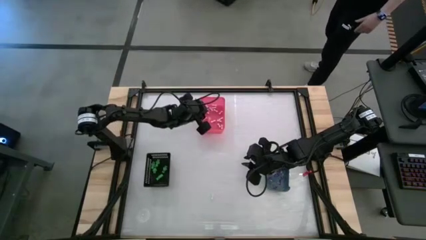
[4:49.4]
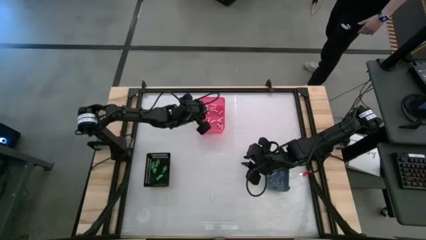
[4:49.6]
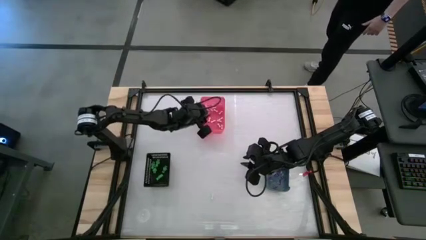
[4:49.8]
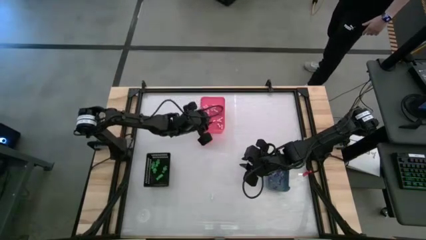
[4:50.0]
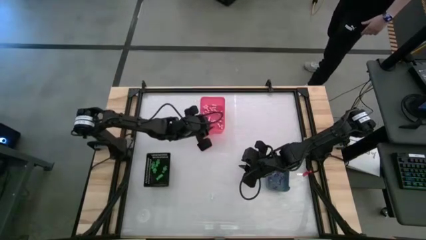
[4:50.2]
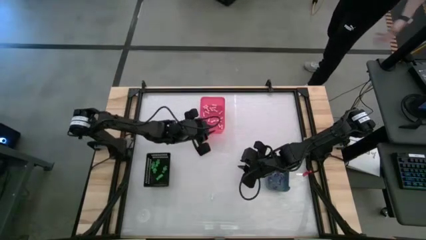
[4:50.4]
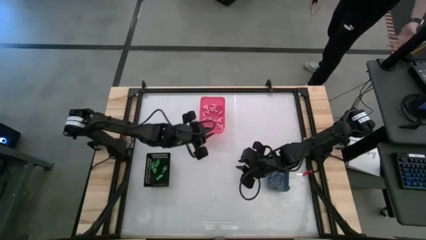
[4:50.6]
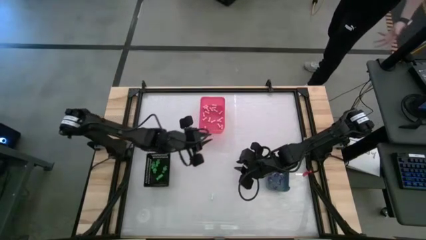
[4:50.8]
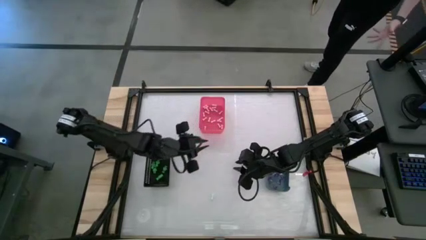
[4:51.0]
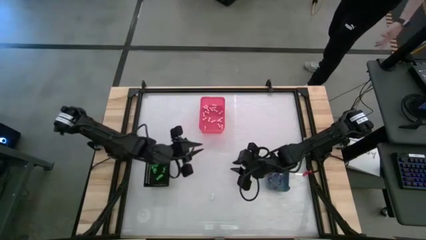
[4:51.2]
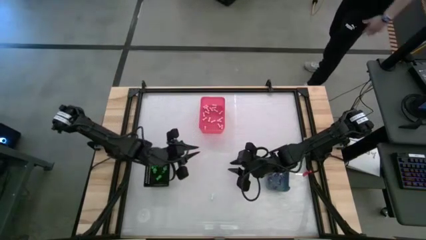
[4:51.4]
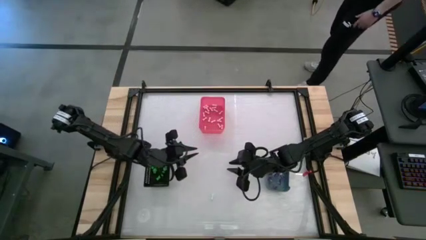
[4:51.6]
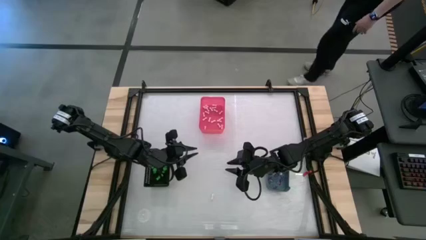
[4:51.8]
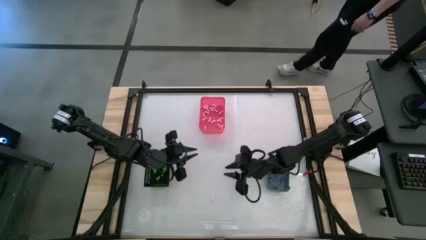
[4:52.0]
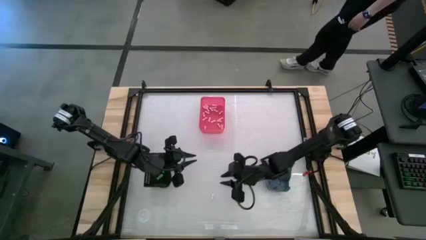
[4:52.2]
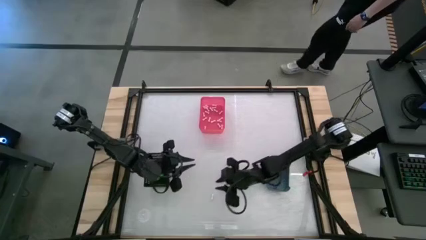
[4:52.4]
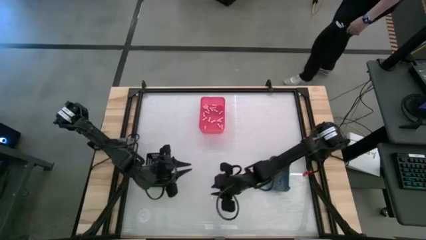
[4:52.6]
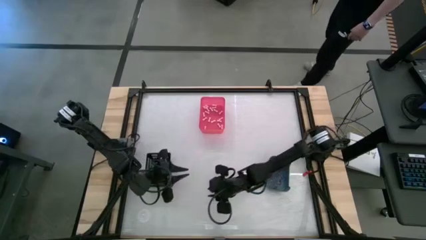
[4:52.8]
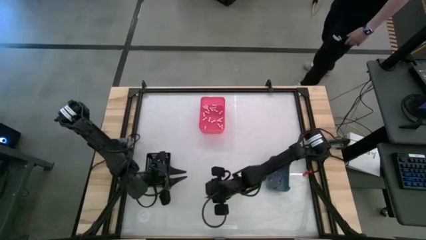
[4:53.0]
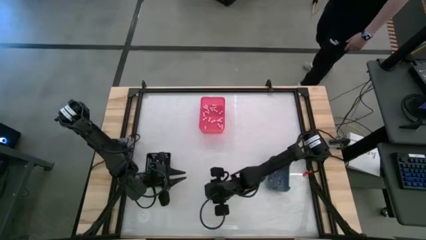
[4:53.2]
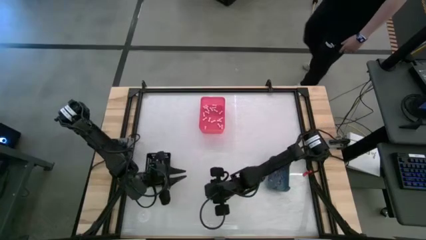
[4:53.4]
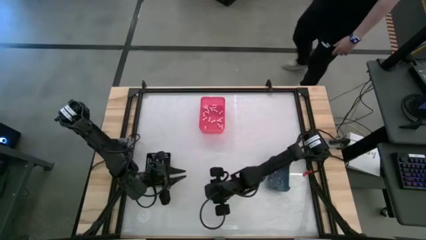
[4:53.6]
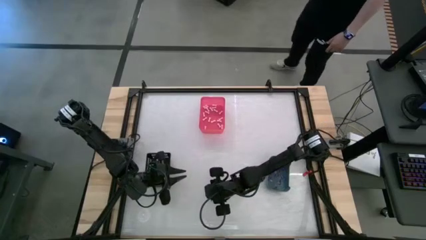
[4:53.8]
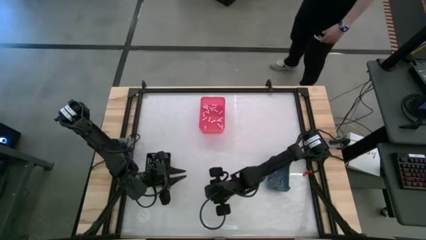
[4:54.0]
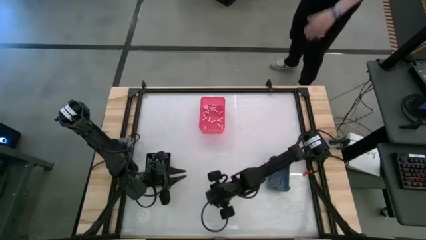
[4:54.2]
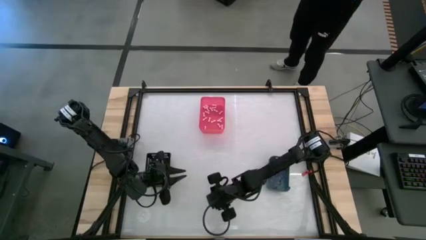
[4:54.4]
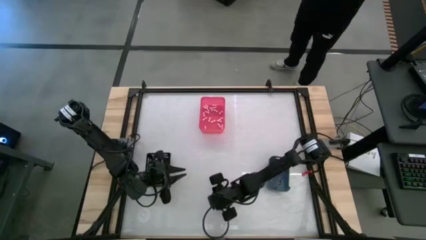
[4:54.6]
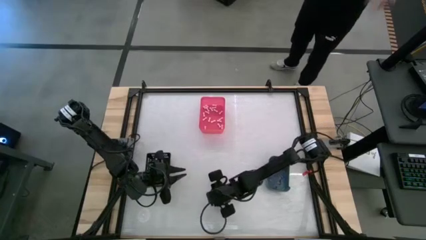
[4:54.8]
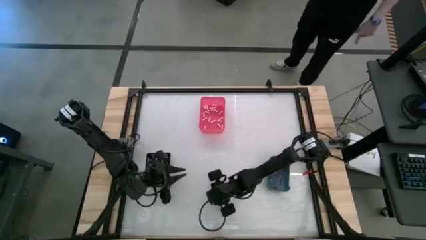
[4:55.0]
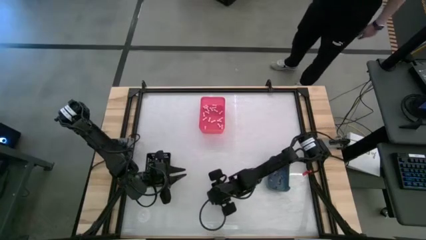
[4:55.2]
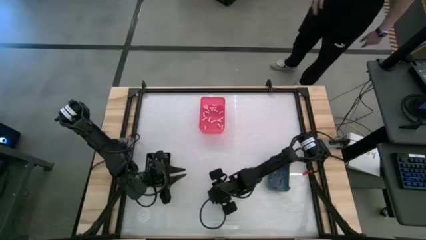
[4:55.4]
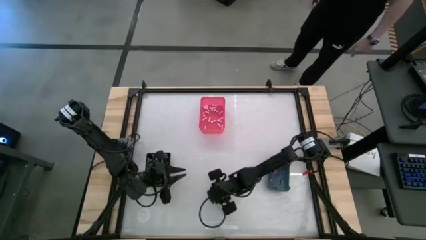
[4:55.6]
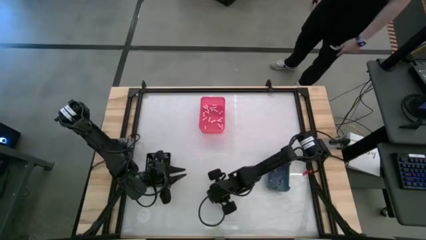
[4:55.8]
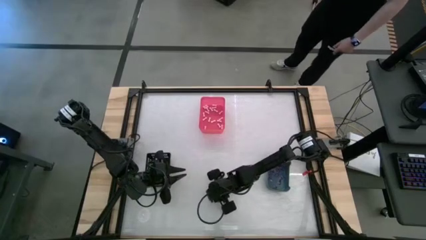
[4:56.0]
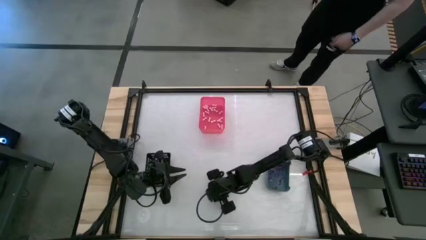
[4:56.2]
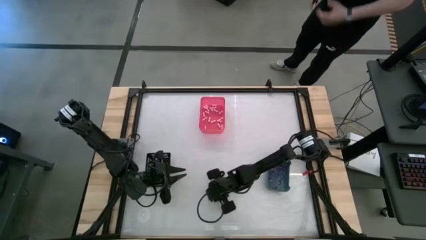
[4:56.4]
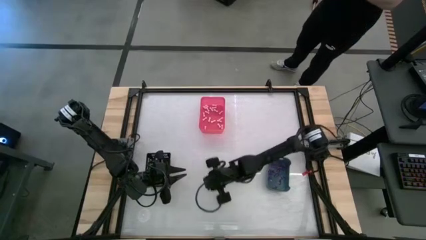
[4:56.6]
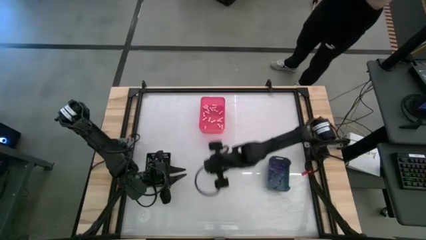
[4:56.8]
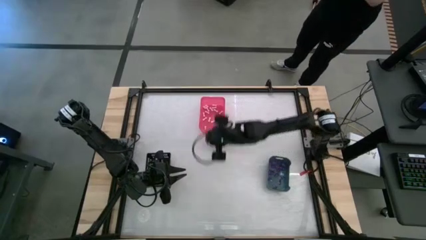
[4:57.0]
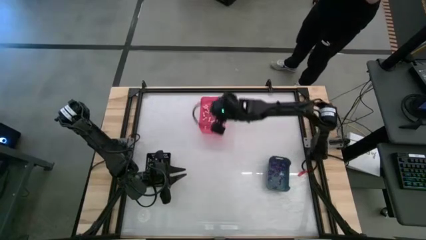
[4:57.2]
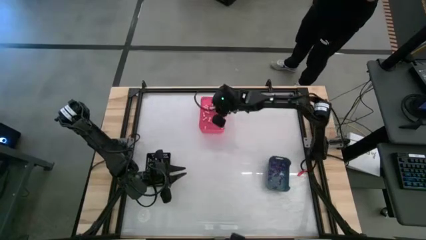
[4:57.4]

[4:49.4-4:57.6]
Task: Sort Halloween decoration
Put the bone toy into the red bin

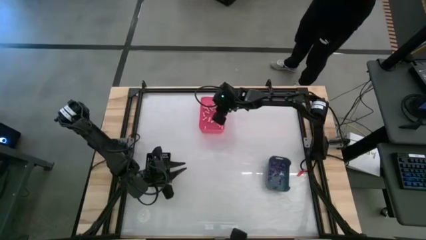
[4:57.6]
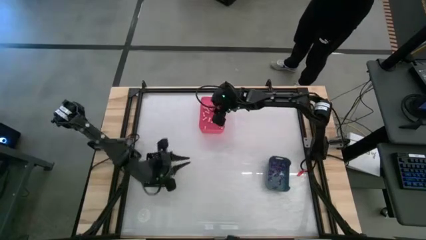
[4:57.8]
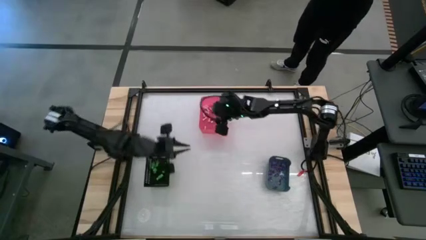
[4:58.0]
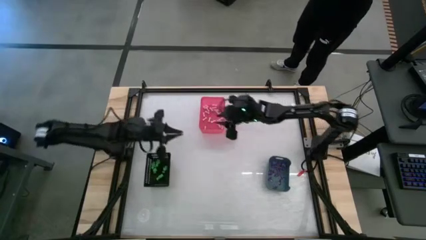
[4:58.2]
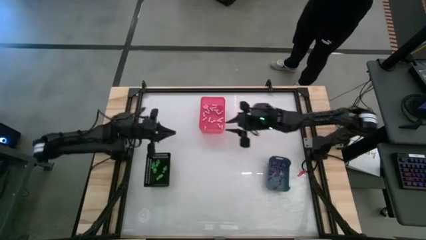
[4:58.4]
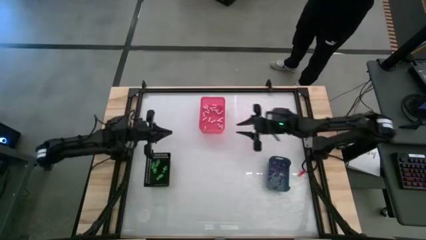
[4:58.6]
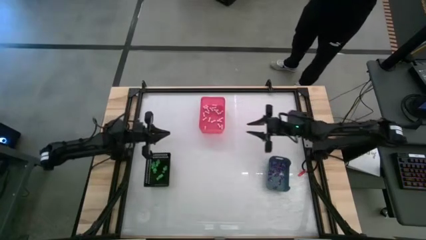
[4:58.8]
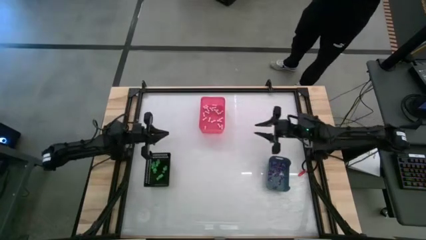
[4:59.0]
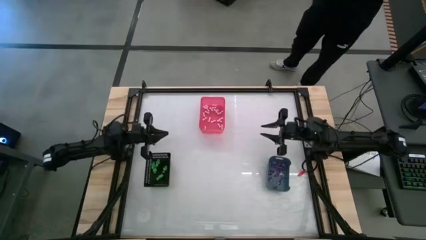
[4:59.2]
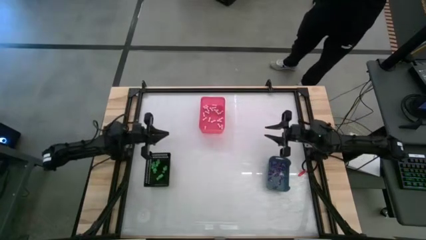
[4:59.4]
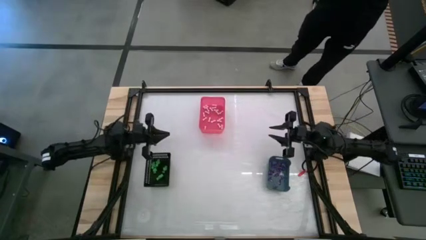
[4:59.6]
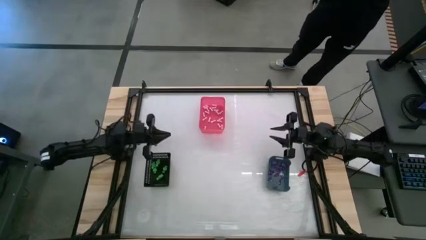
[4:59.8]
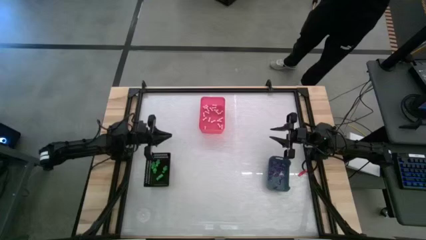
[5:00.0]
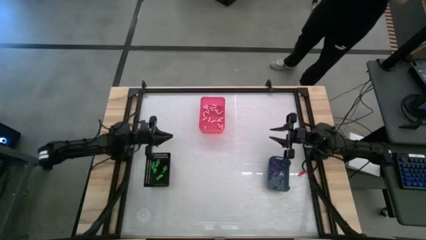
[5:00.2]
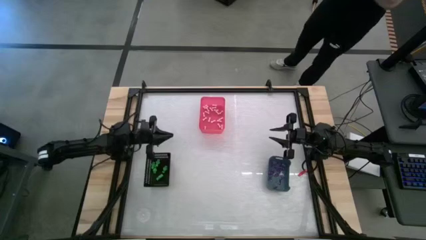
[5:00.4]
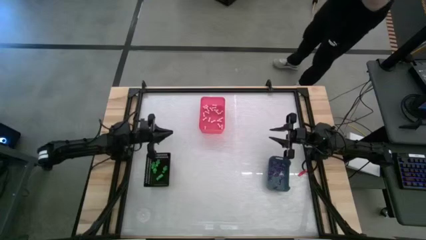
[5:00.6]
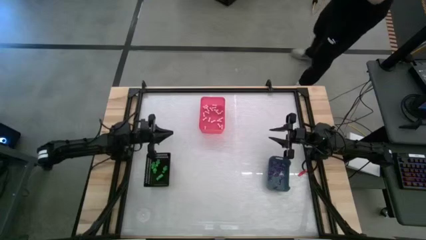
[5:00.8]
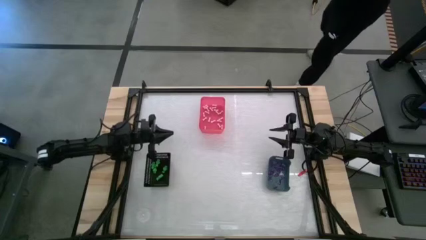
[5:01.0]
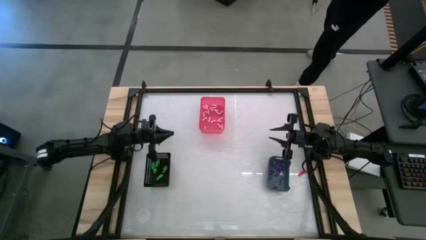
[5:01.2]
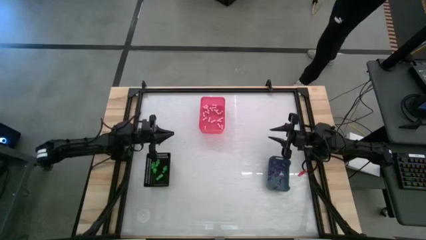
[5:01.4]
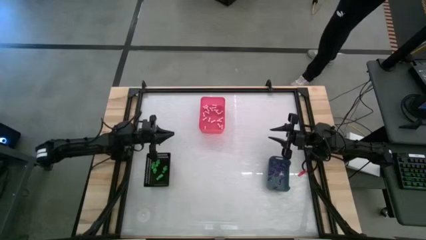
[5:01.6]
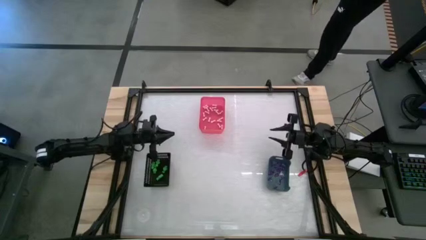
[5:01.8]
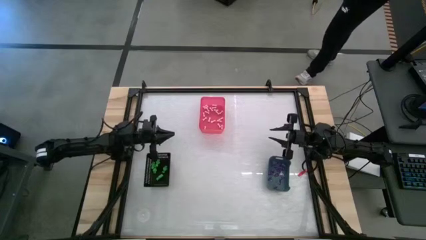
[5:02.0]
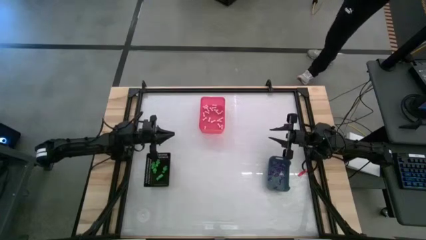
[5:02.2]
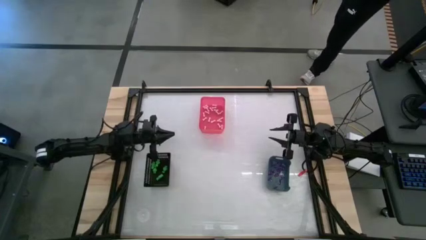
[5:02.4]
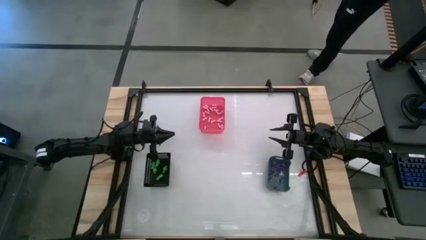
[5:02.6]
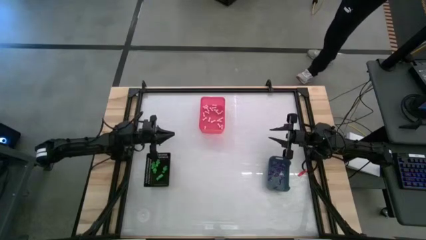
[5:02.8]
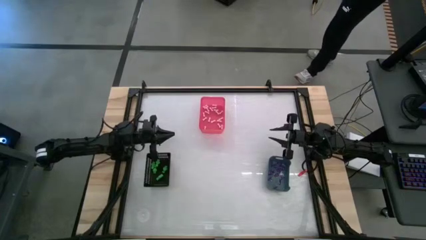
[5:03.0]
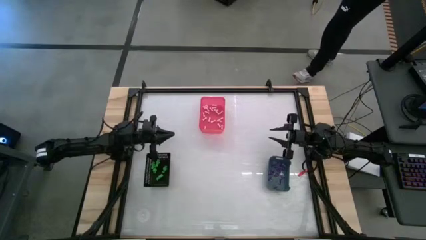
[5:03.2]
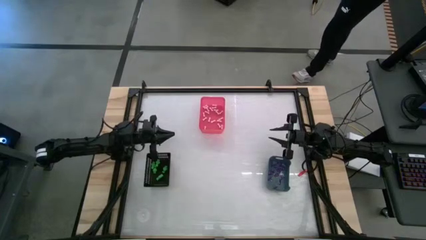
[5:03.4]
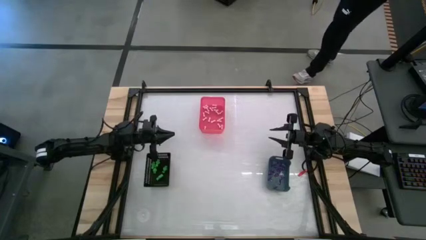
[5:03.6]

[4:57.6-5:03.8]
Return to Home Position

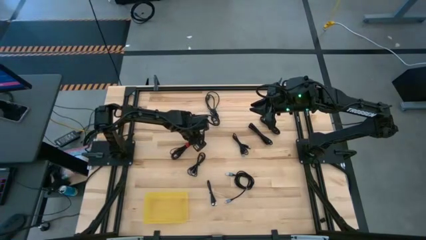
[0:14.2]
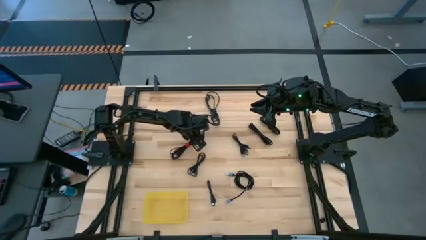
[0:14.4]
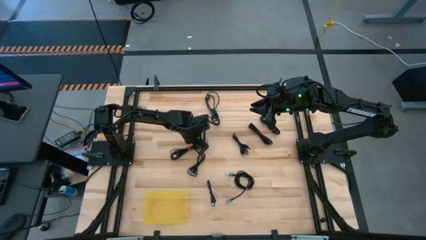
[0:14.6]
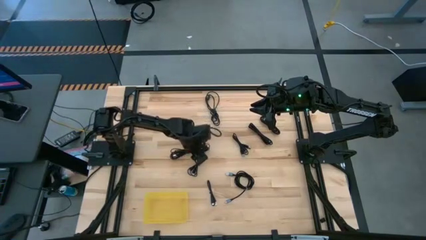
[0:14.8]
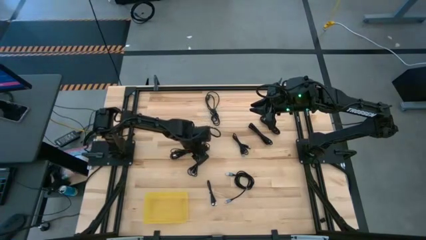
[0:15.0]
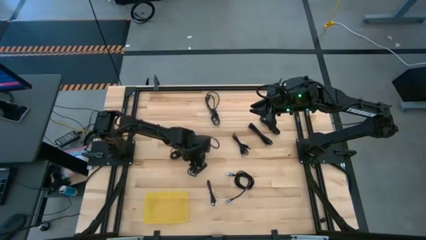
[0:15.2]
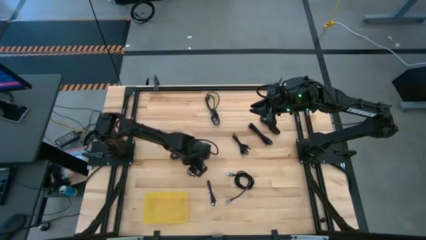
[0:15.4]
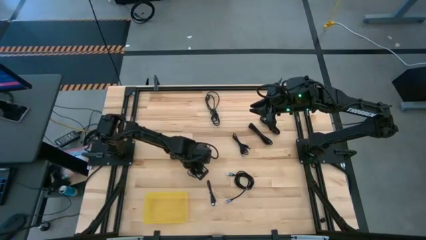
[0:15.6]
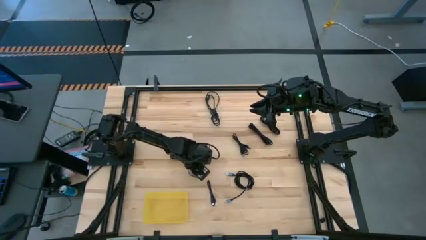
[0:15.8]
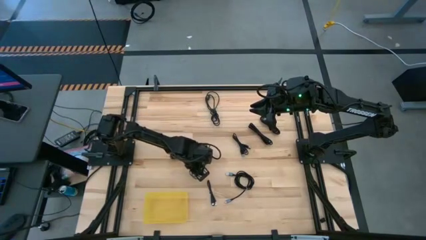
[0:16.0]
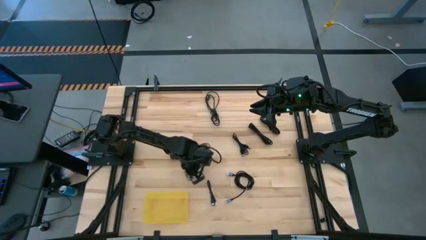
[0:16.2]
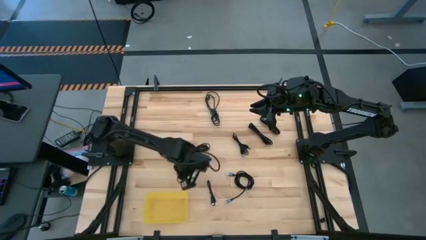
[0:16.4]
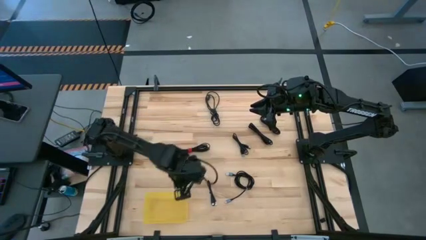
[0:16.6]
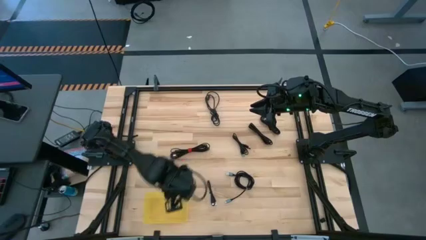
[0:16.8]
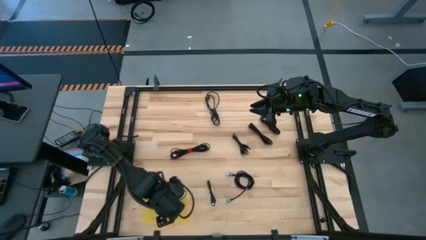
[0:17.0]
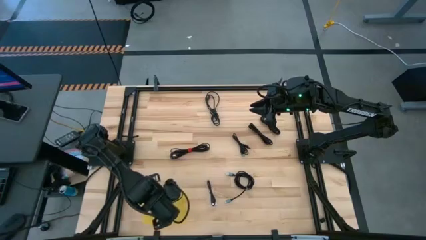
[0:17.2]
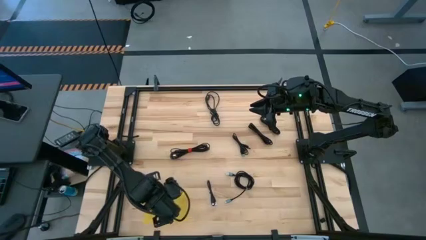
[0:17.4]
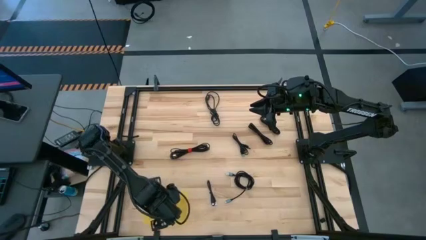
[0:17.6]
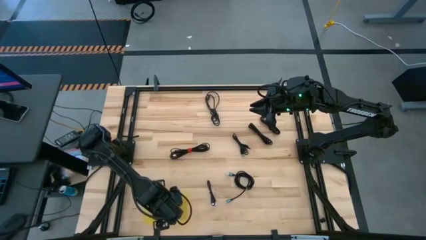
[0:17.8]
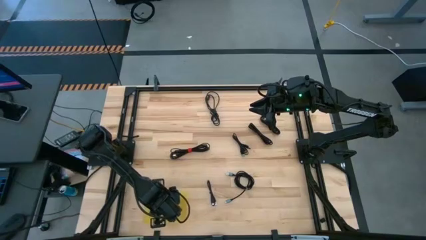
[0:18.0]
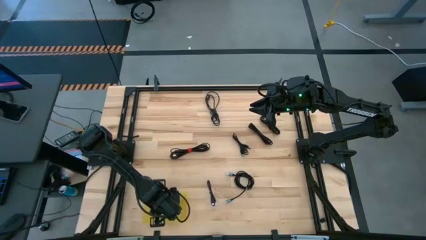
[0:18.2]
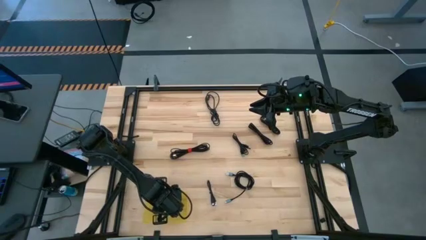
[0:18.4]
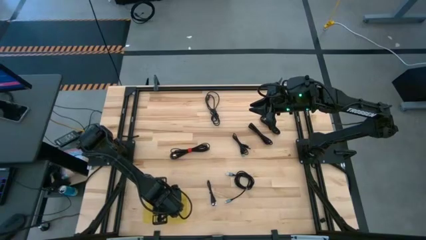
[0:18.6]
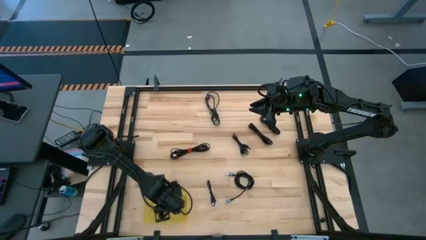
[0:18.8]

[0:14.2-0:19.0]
Task: Pick and place USB-C Cables
Put the black charger cable into the yellow bin
